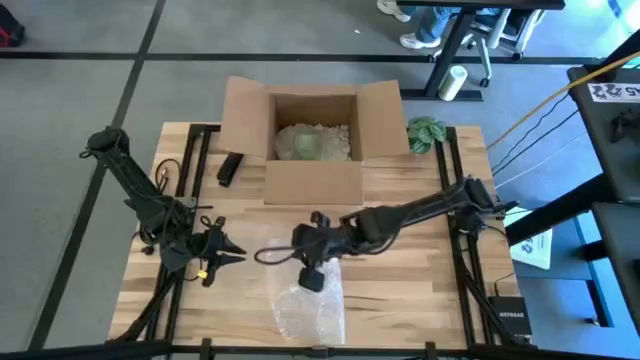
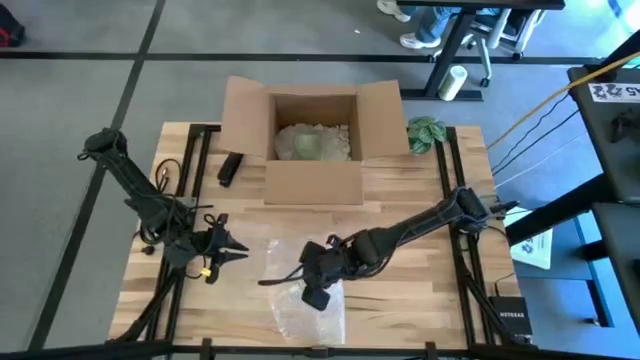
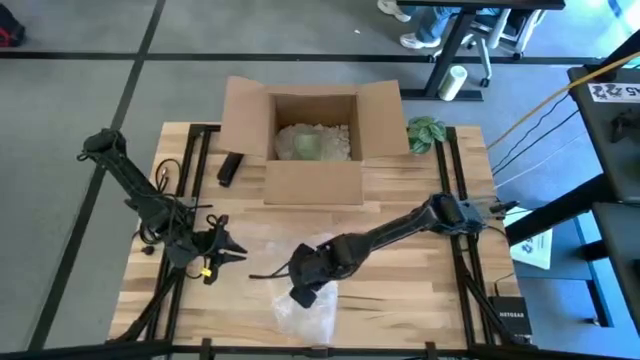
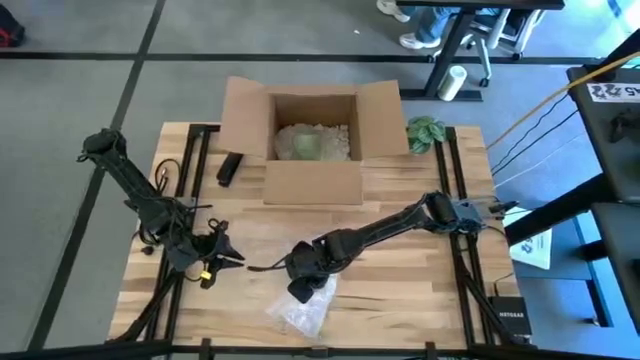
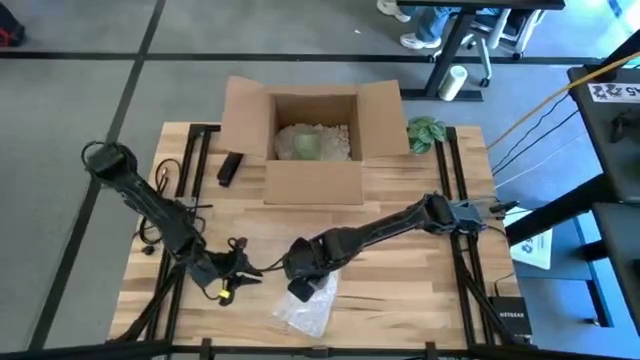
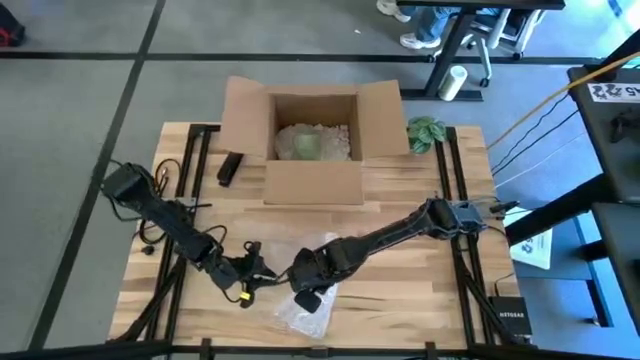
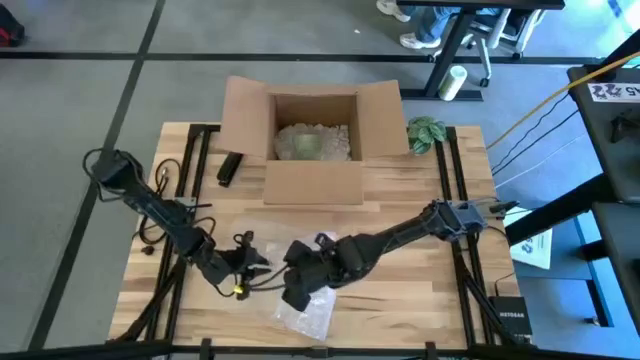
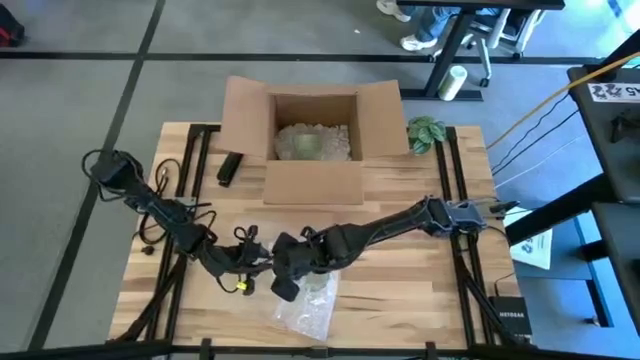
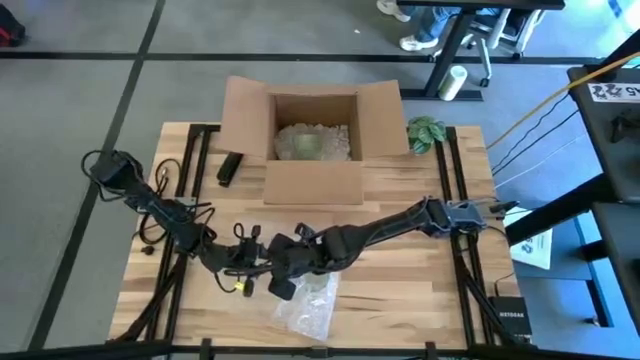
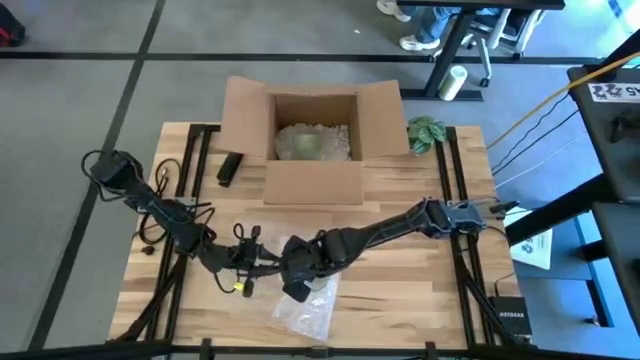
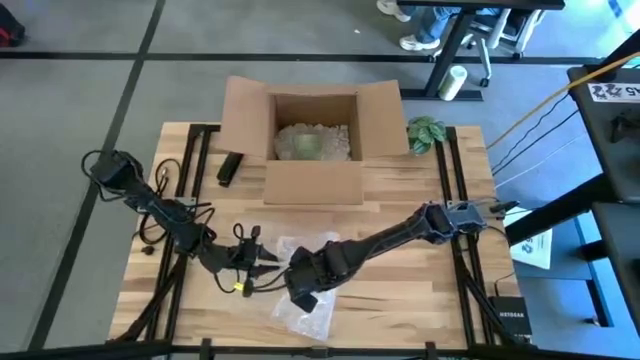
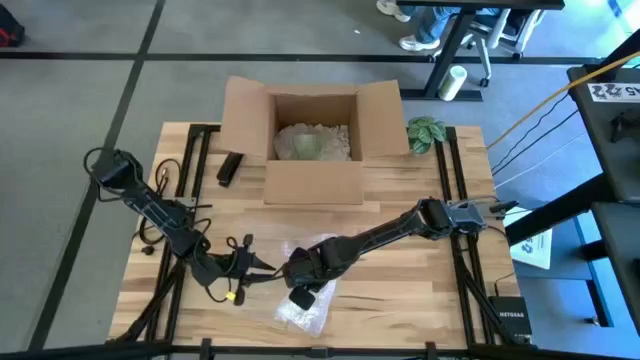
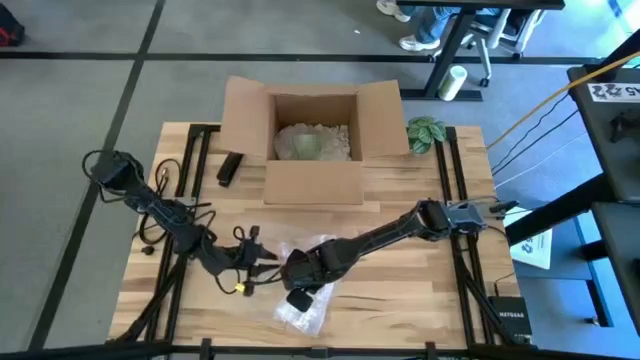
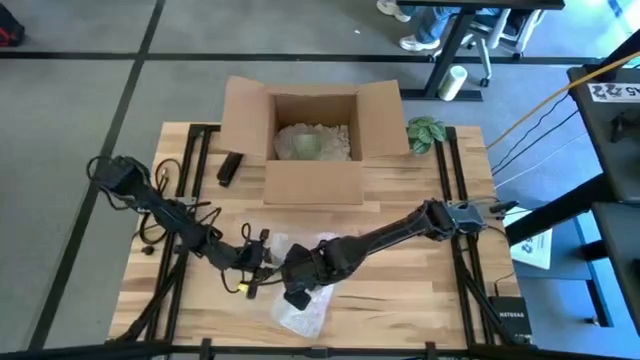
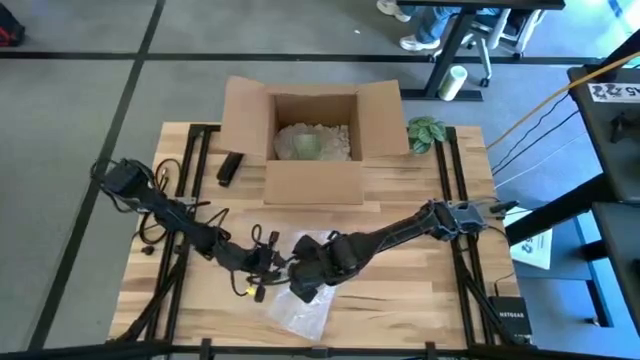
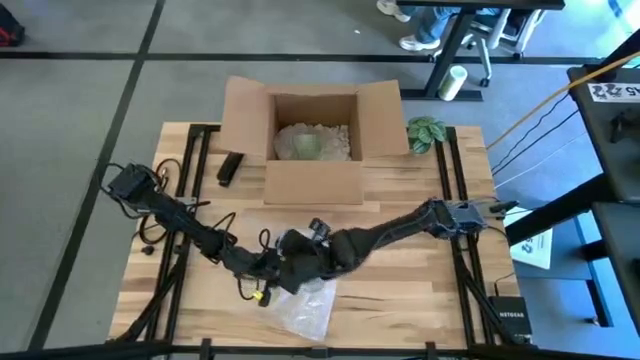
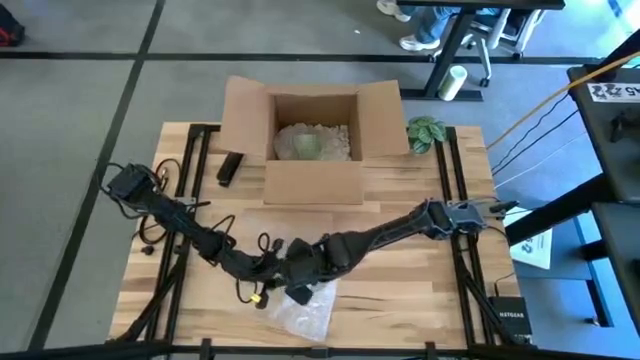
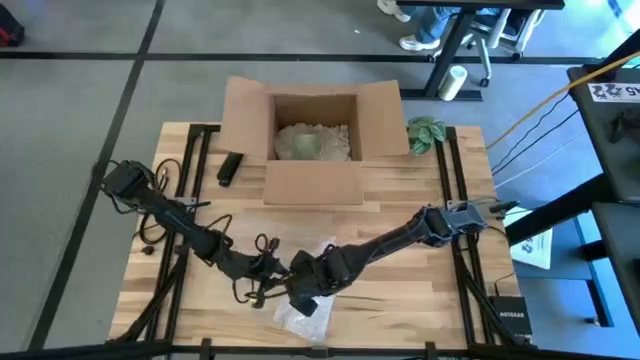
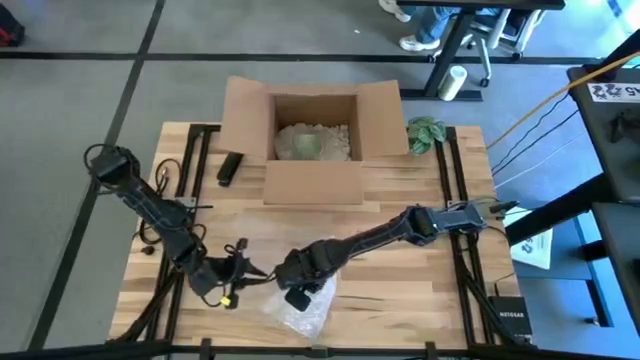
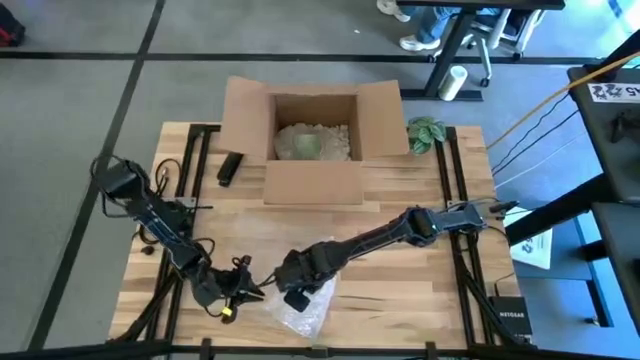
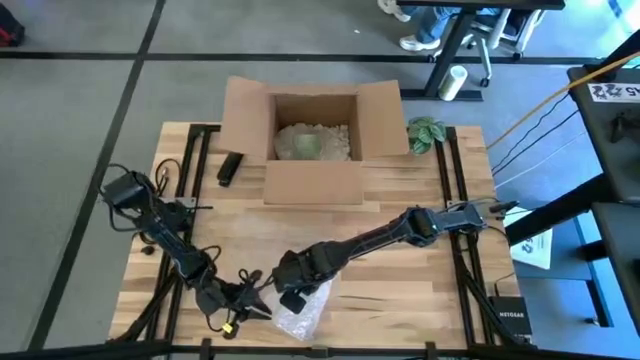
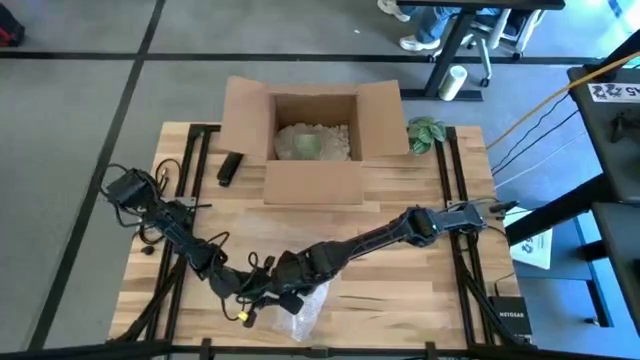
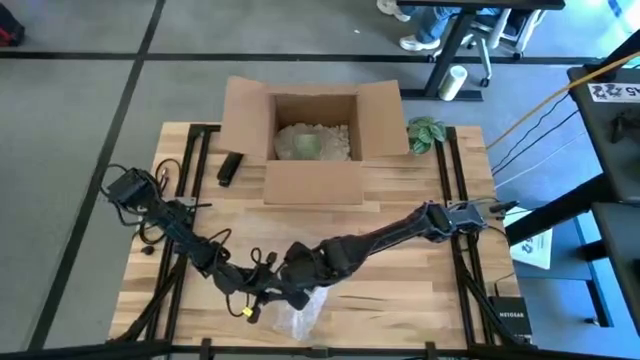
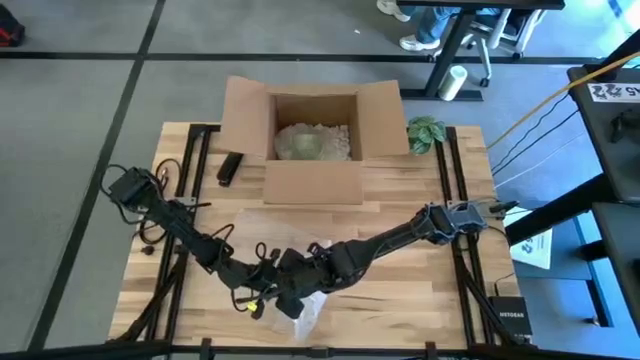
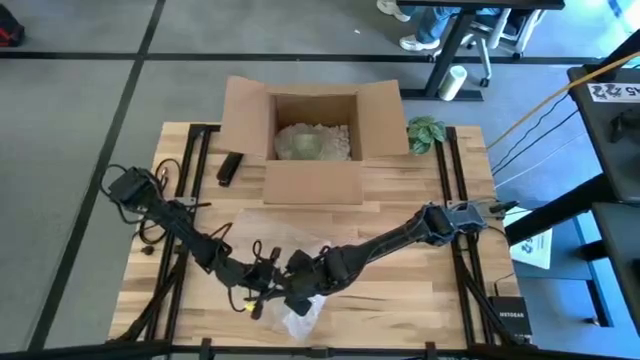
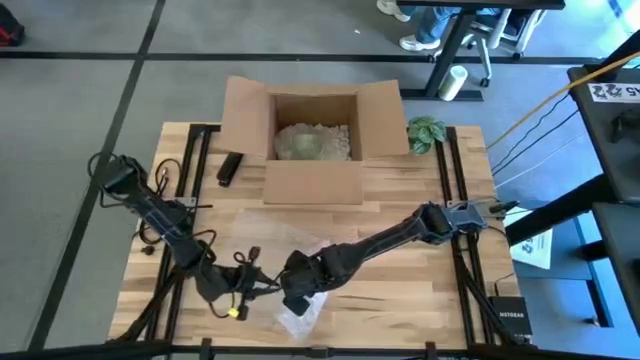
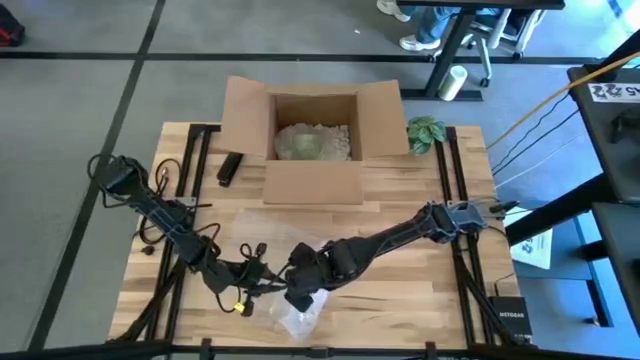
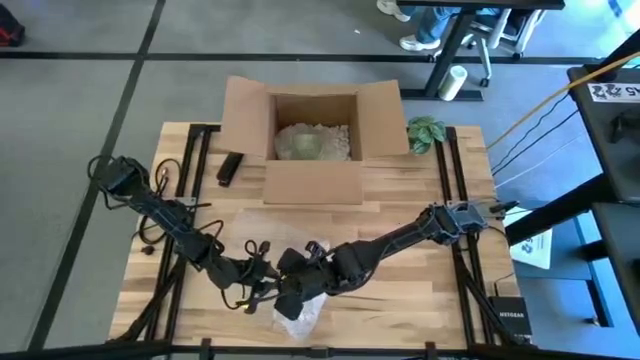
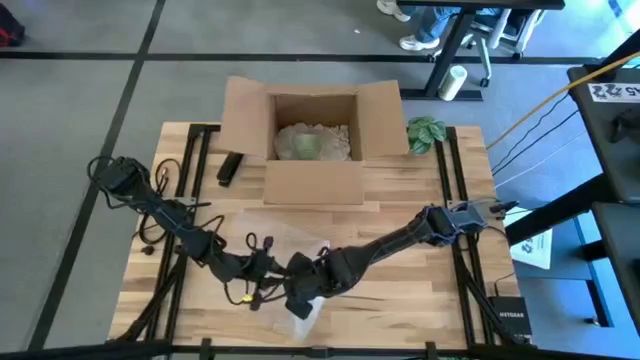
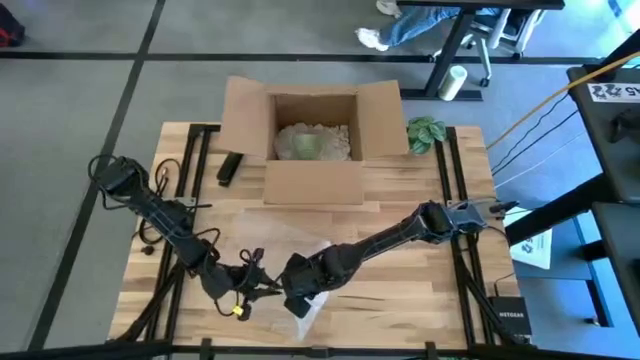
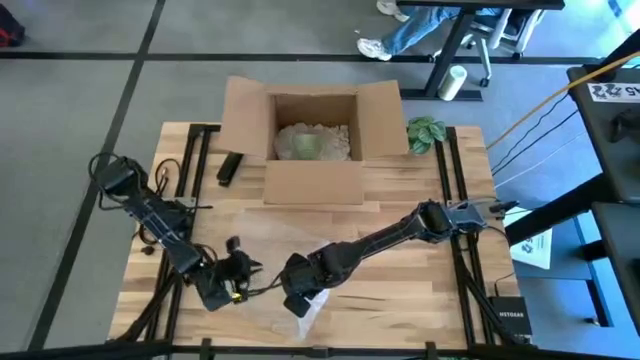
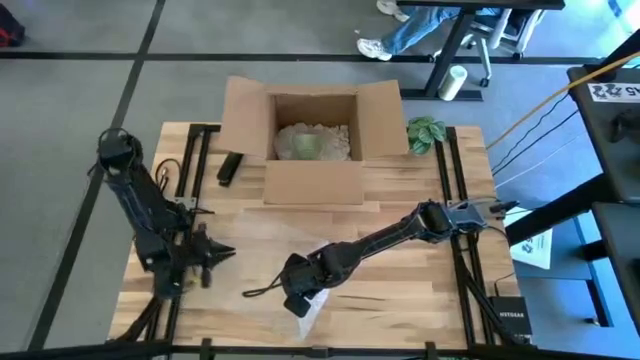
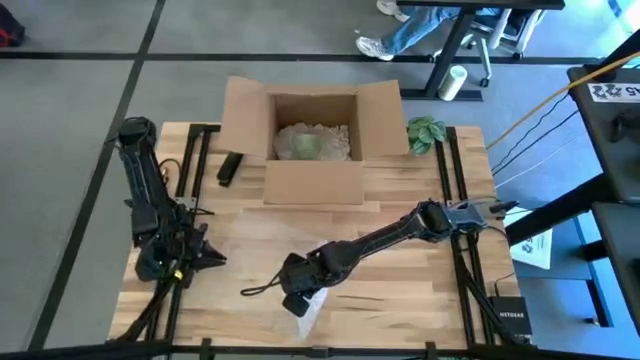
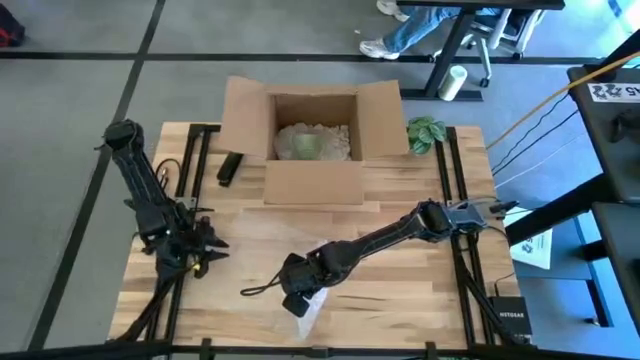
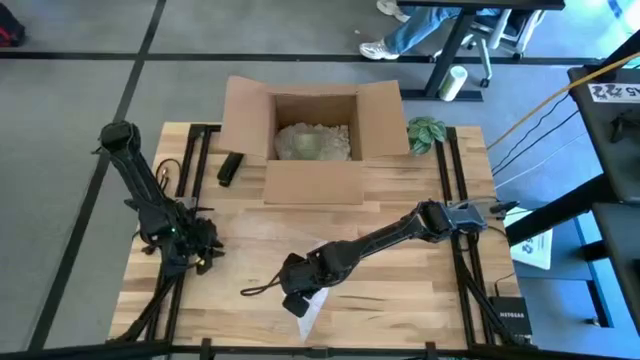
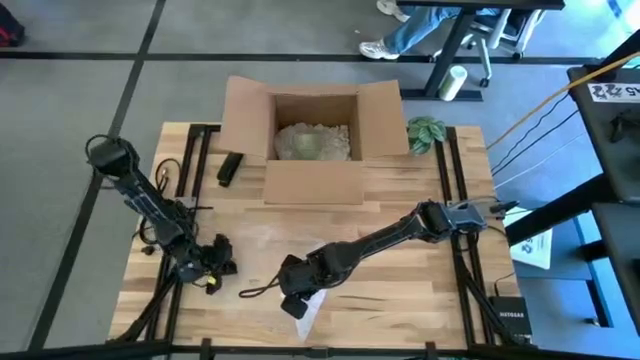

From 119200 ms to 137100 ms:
Task: wrap mug
Wrap the blue mug with bubble wrap

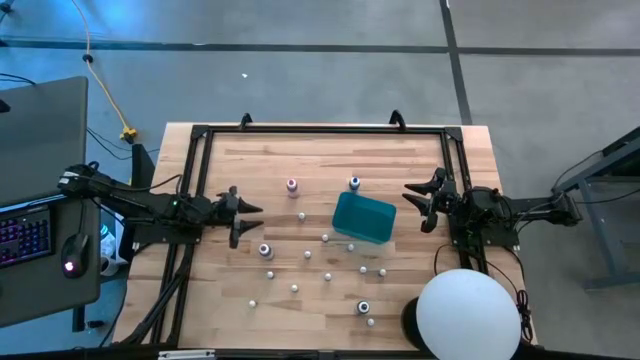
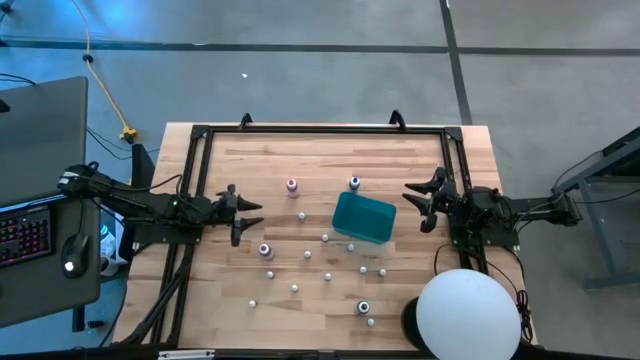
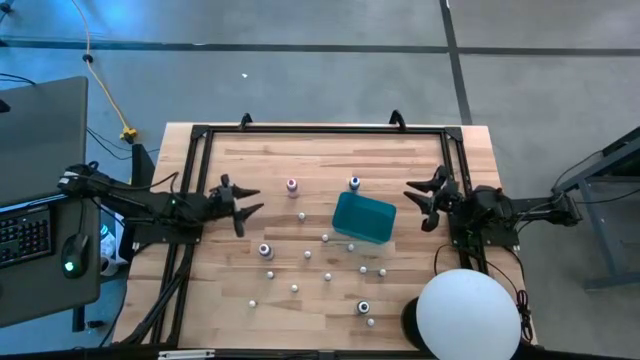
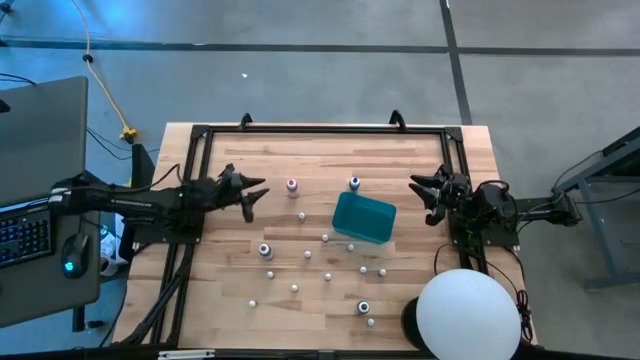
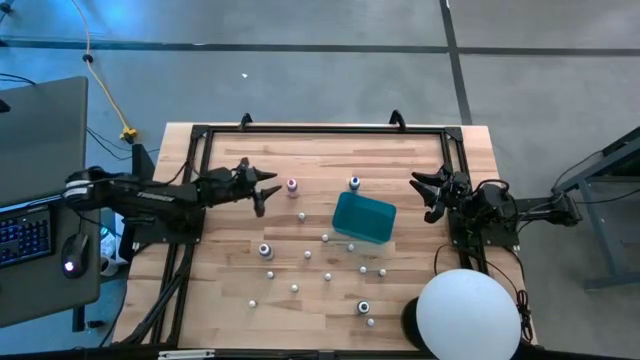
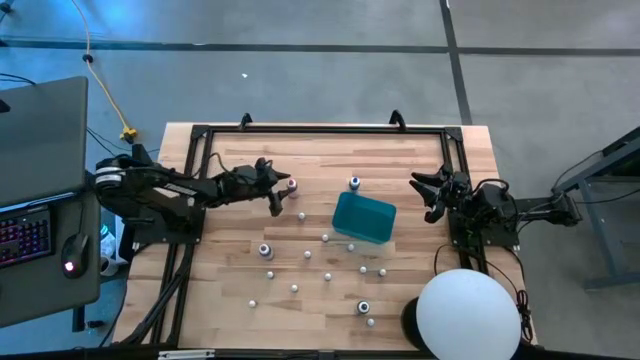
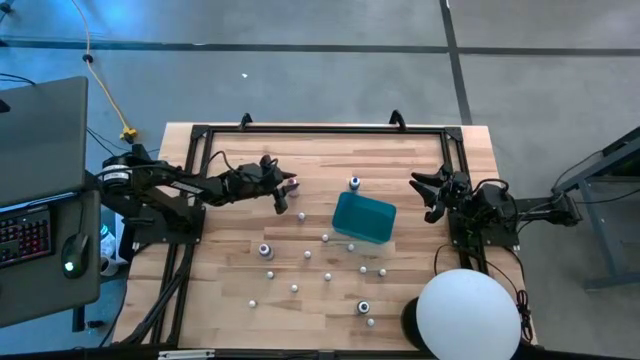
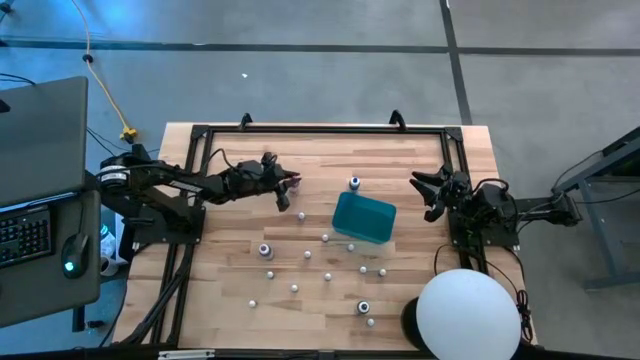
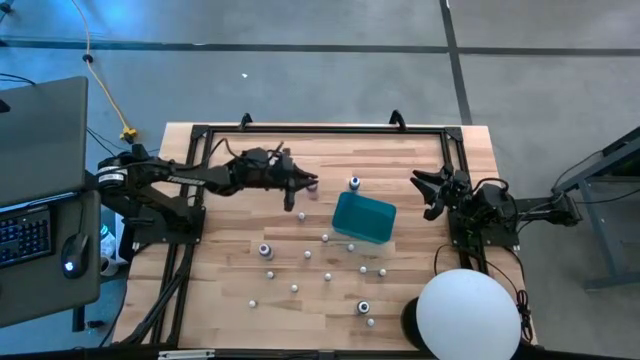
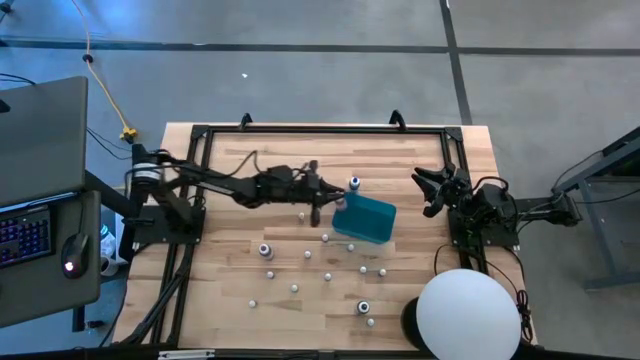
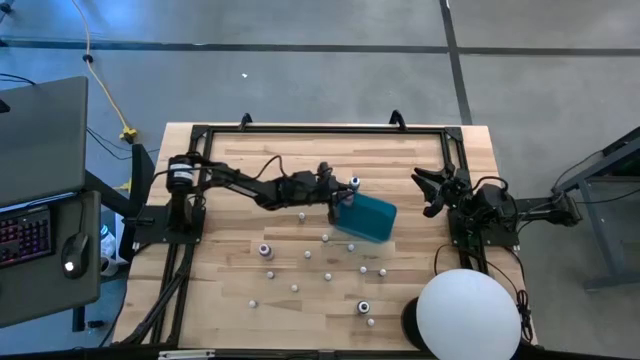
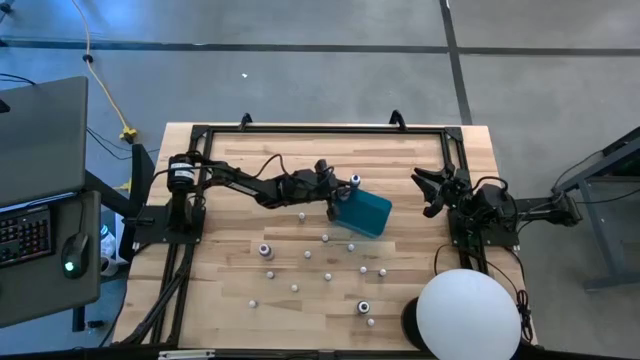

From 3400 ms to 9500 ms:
Task: Pick & Place food coloring
Put the large red food coloring bottle into the blue container
